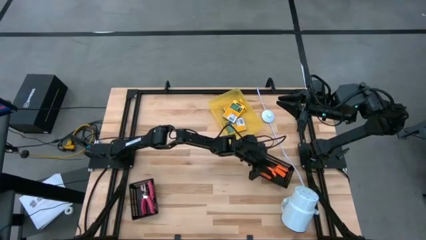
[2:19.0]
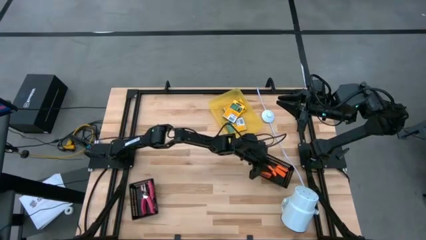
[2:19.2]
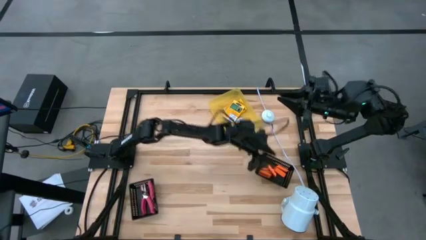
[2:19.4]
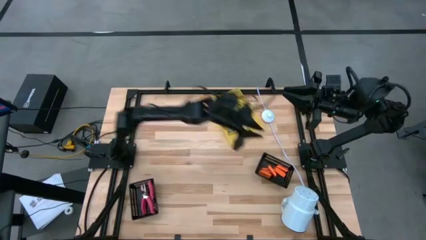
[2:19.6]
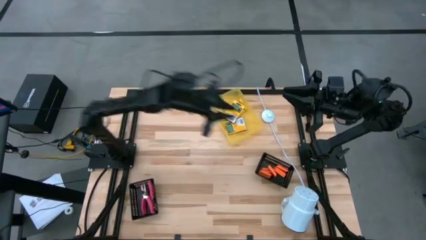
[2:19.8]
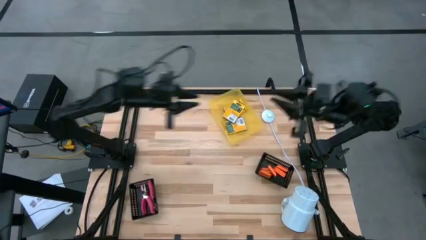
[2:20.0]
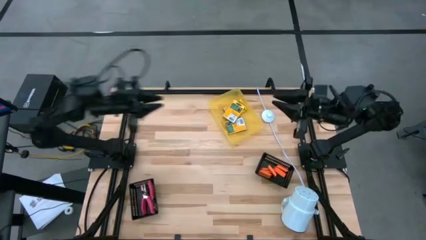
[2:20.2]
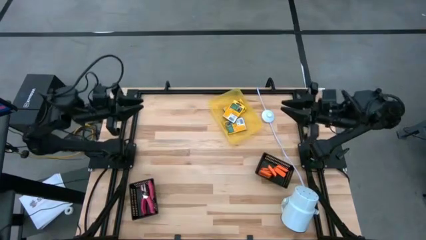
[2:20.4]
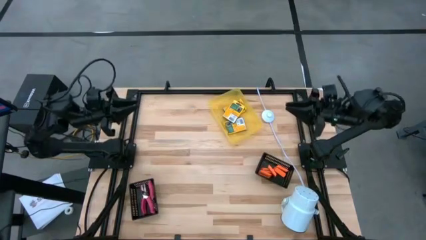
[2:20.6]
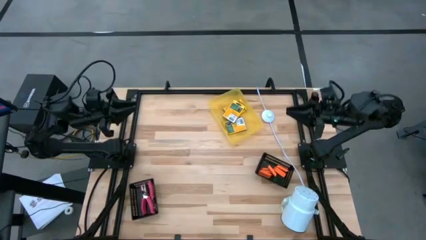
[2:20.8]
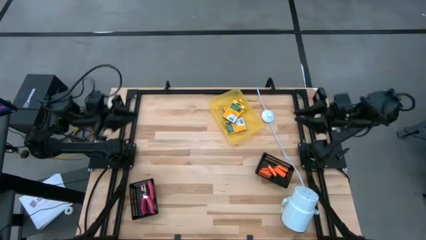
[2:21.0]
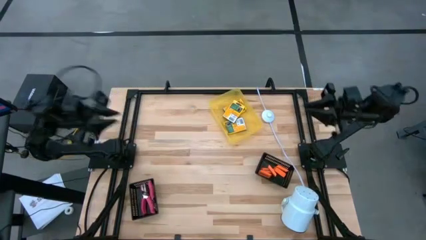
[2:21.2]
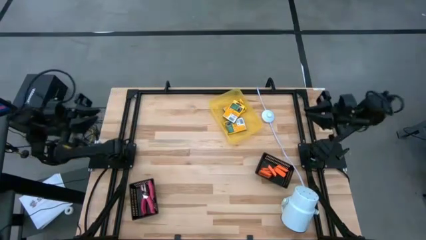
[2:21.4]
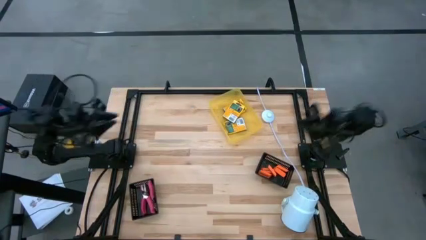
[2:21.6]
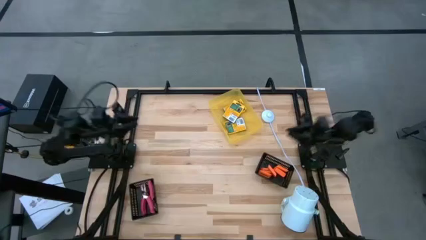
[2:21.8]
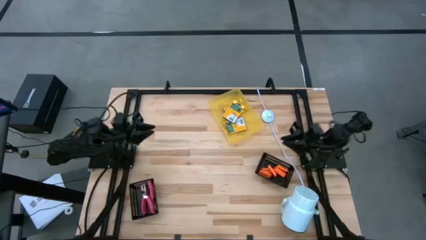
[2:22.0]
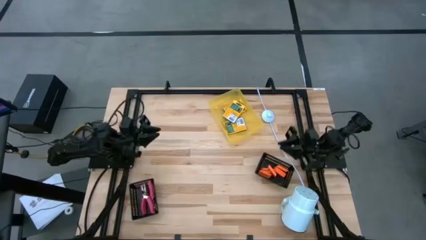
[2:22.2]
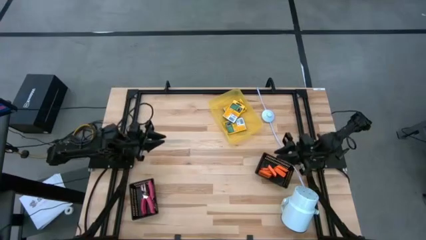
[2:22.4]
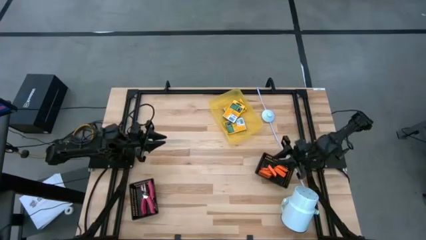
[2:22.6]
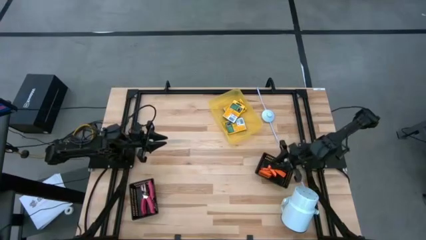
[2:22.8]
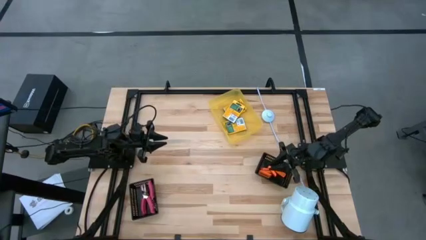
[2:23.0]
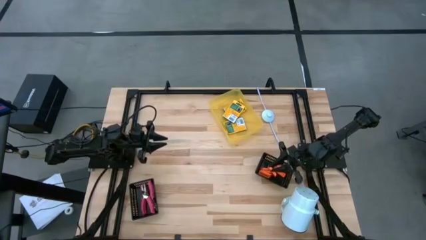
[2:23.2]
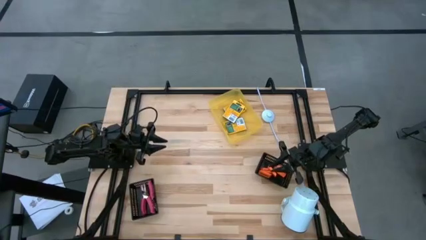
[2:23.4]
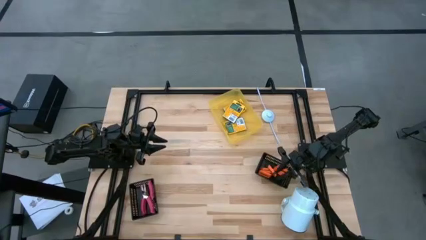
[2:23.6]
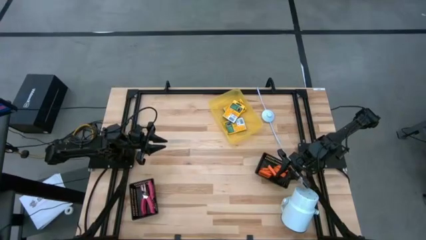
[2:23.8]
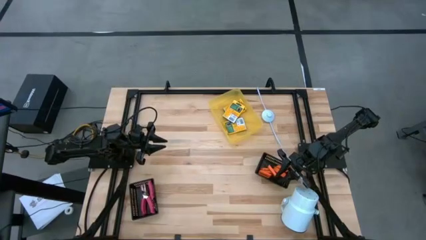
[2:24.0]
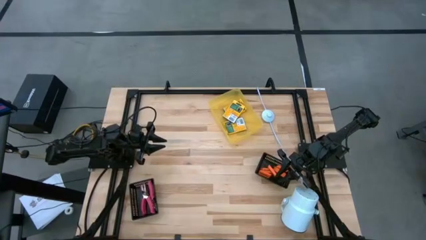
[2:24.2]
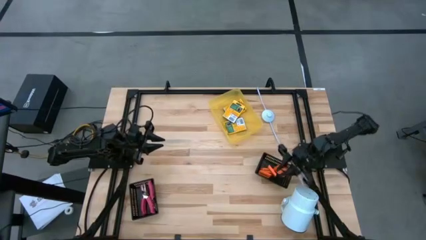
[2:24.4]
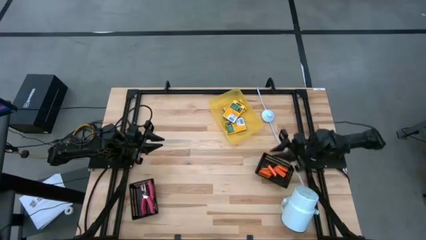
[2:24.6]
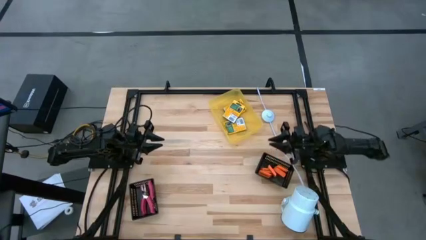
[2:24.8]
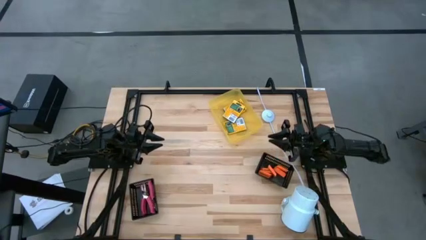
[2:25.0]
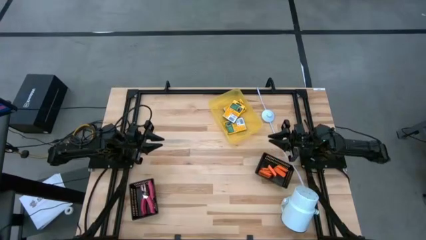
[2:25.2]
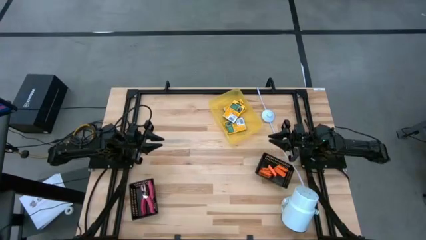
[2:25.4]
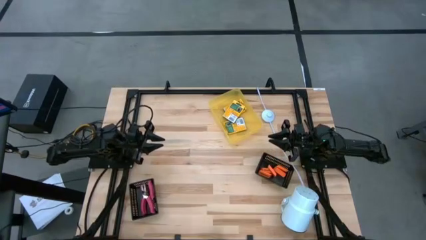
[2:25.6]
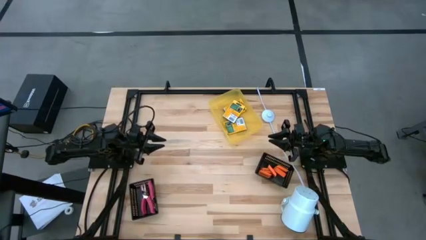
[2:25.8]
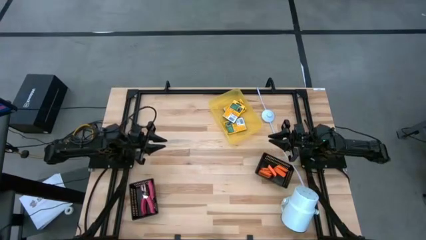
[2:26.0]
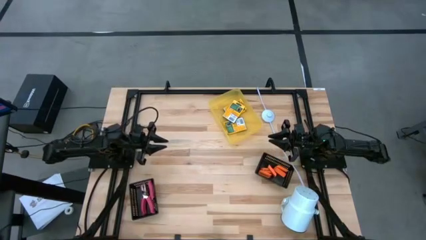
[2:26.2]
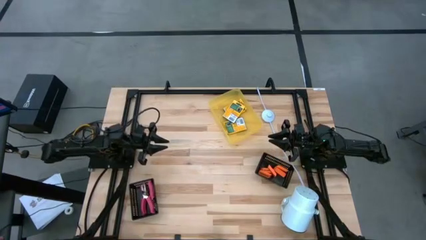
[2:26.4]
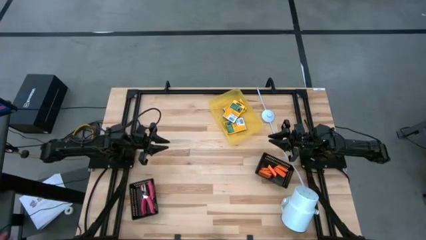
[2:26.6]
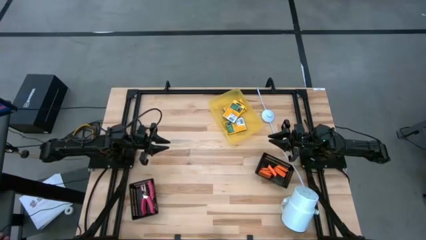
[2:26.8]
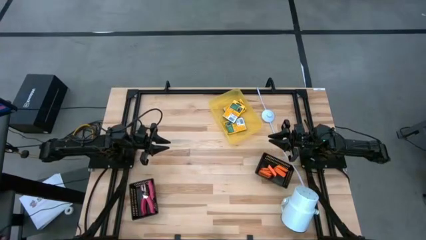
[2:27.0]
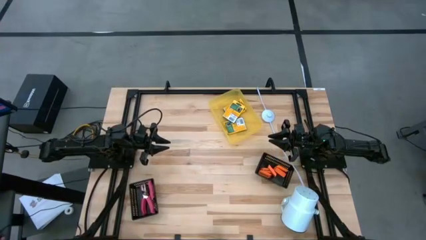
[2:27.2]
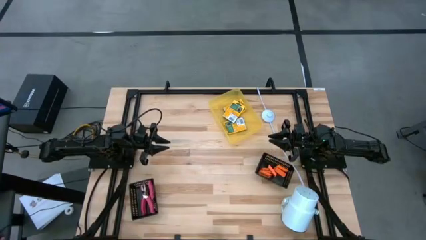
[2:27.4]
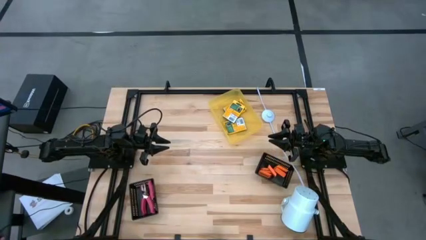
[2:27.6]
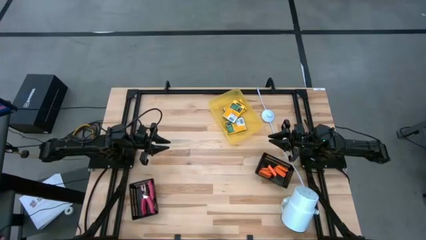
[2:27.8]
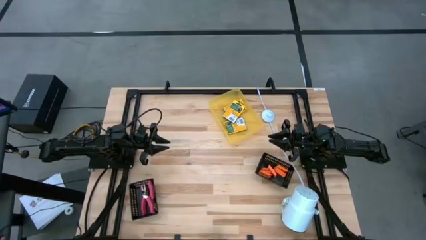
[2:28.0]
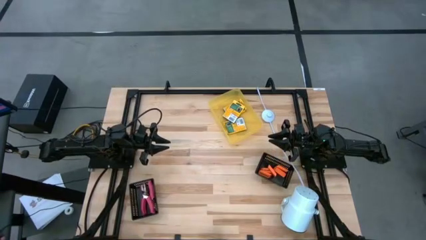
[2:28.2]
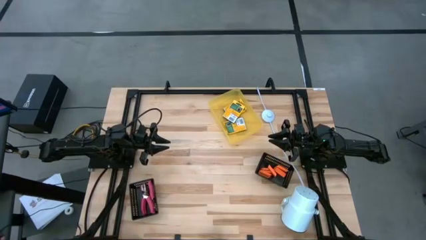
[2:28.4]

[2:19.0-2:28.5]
Task: Pick & Place School Supplies
Return to Home Position

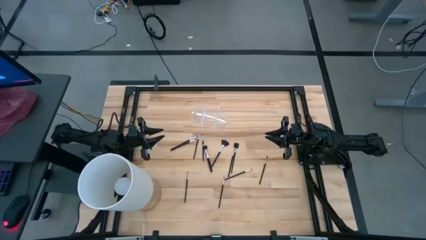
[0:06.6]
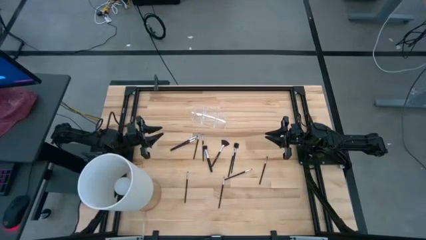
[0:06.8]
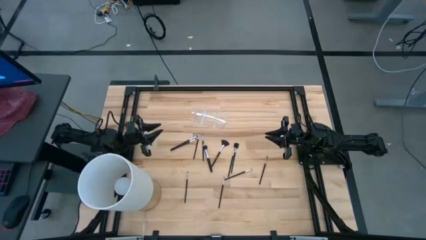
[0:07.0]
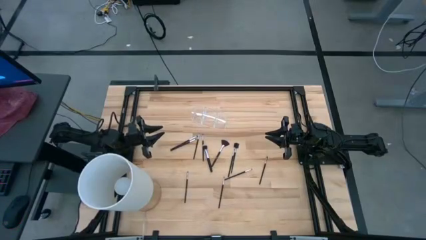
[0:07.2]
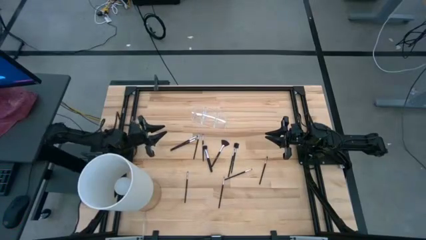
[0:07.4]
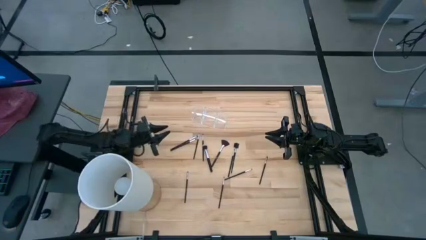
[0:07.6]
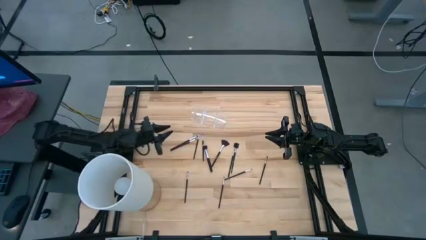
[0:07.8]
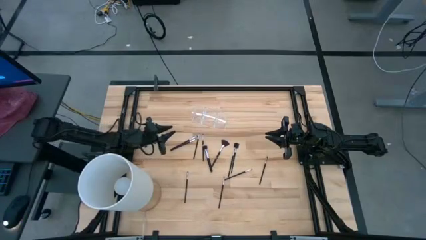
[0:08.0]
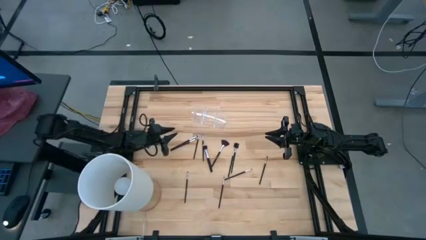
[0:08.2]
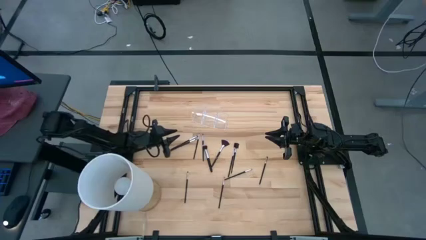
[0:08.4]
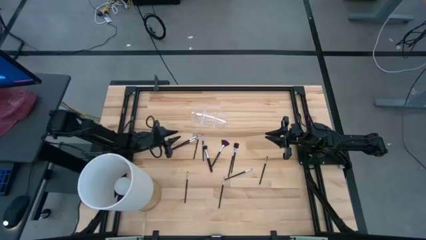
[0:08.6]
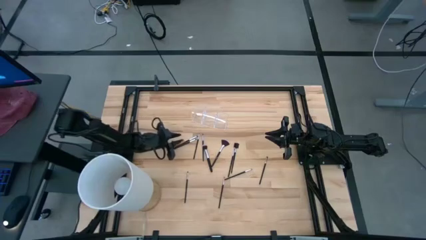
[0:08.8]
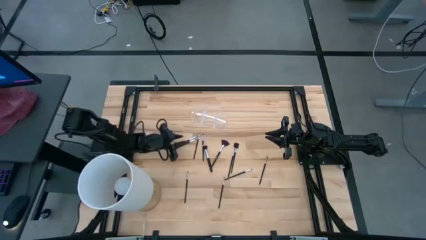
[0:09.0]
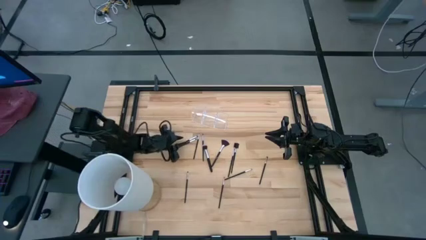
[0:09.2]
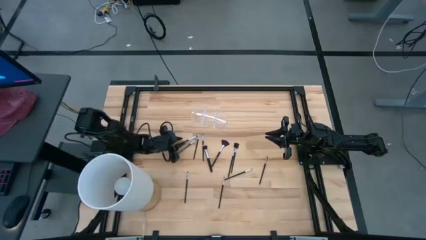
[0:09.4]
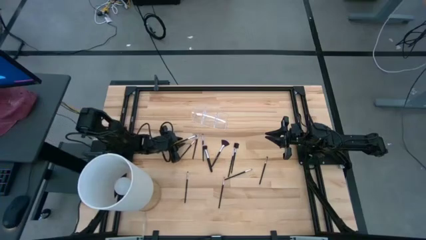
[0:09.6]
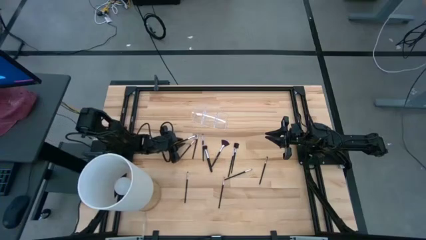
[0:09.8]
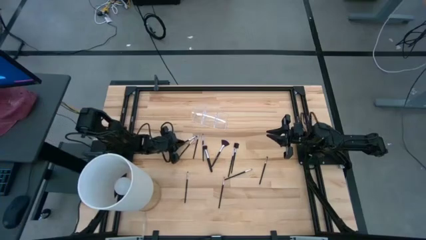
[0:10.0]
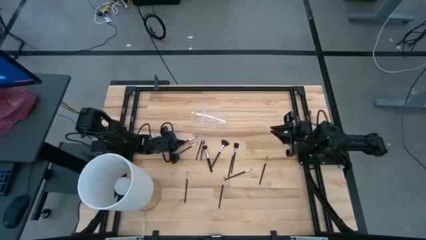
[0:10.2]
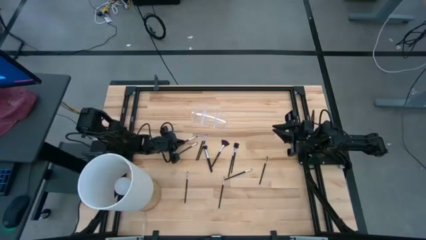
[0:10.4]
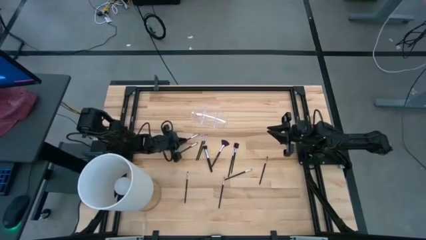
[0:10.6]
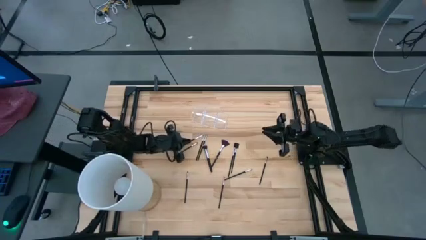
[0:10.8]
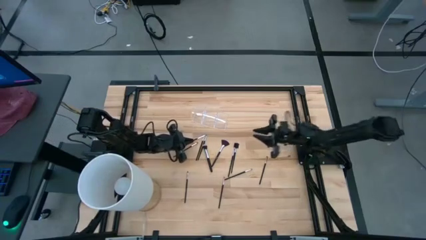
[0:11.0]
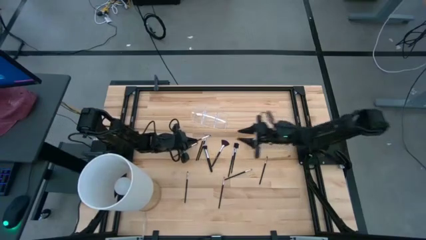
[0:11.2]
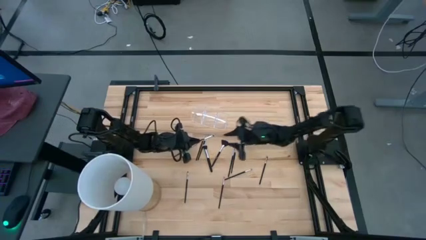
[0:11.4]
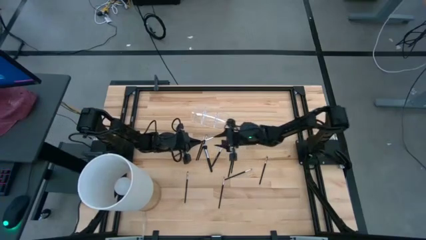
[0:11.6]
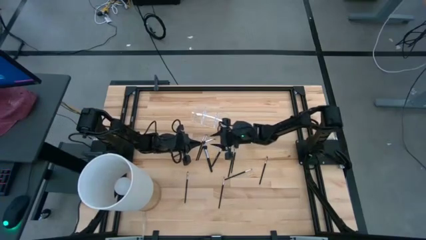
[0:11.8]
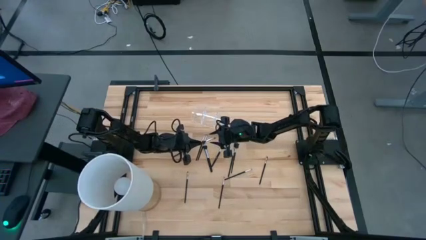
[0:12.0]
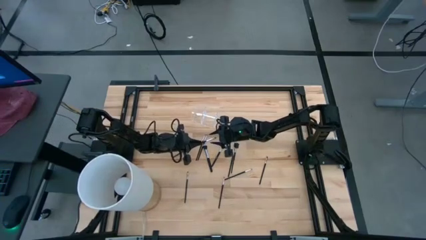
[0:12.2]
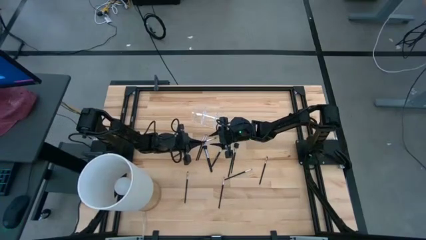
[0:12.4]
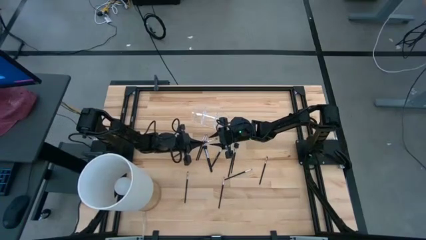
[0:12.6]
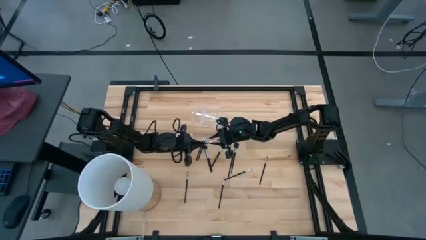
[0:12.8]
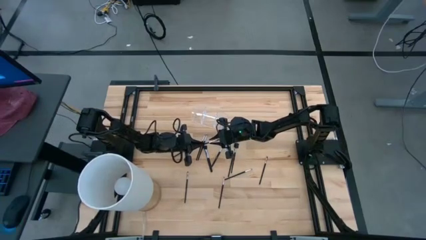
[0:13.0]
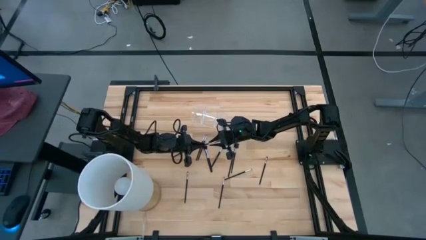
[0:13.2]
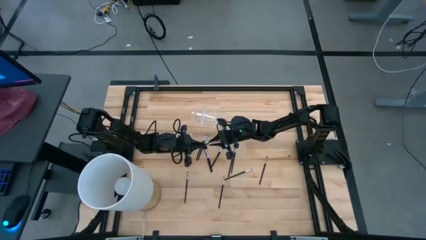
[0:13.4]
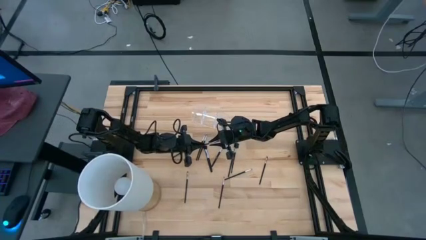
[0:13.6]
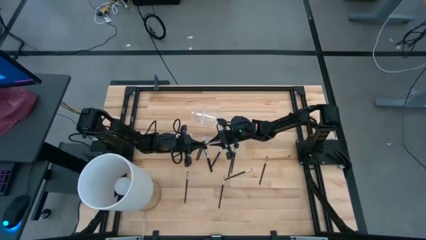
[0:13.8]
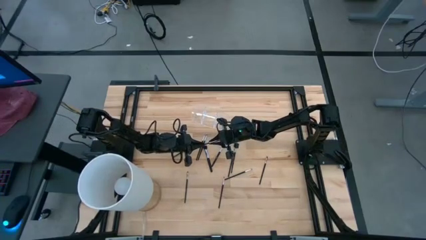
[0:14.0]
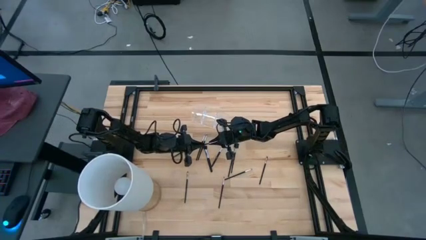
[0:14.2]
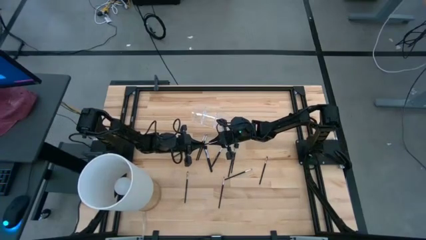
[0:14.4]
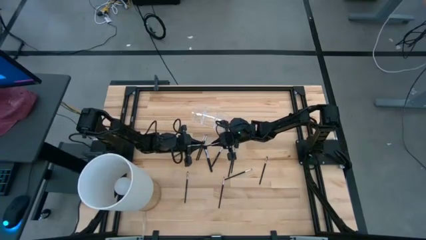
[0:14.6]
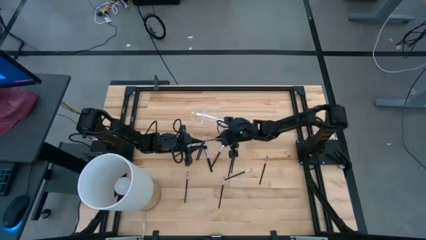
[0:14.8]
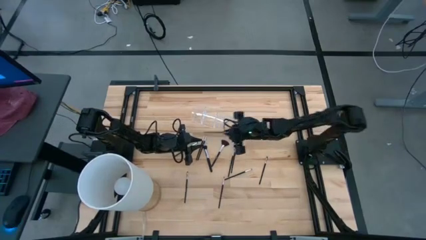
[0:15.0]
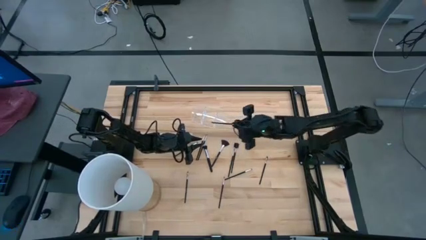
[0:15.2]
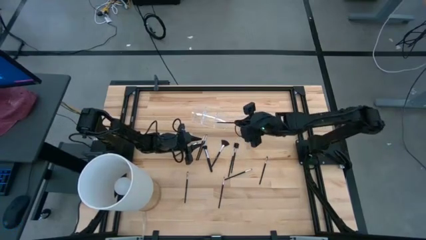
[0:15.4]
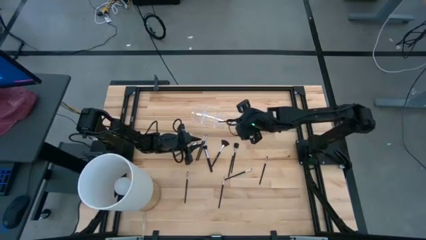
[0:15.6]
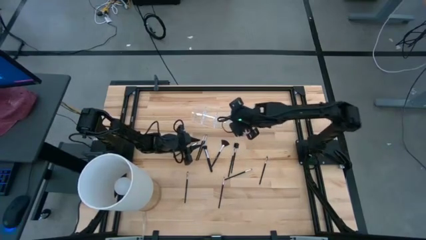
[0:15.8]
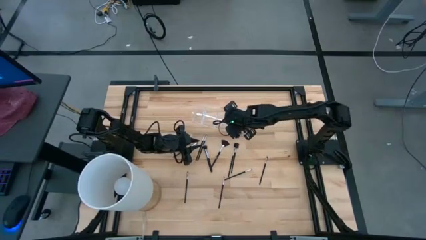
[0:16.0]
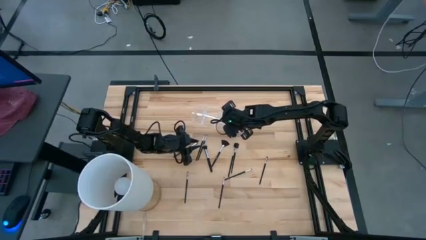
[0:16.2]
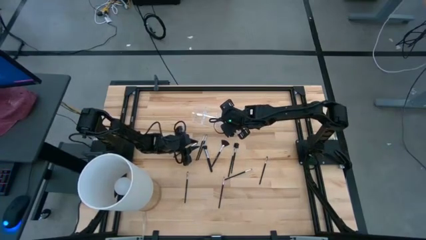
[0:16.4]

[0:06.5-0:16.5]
Task: Put items in baskets/containers
Put the black eyeshadow brush into the transparent organizer
